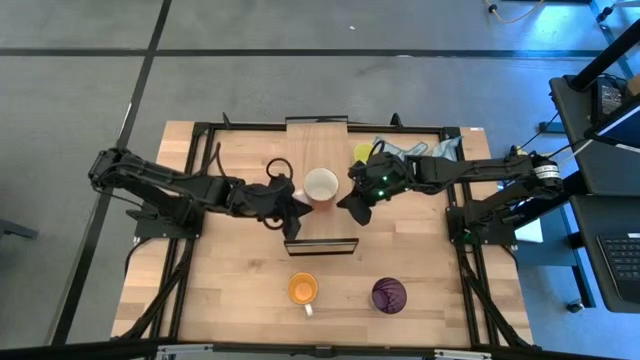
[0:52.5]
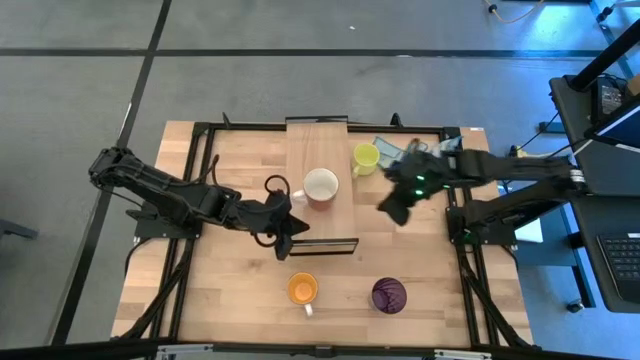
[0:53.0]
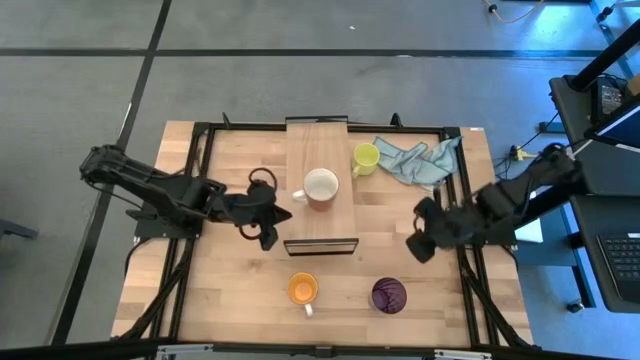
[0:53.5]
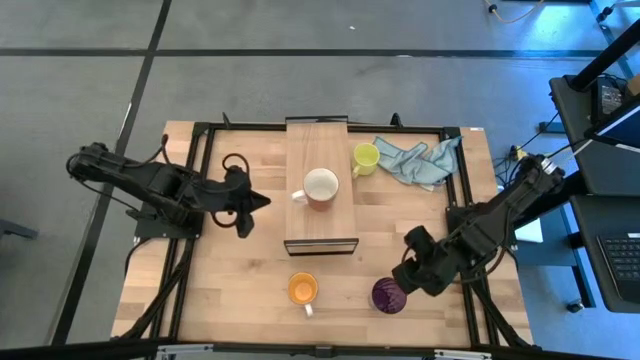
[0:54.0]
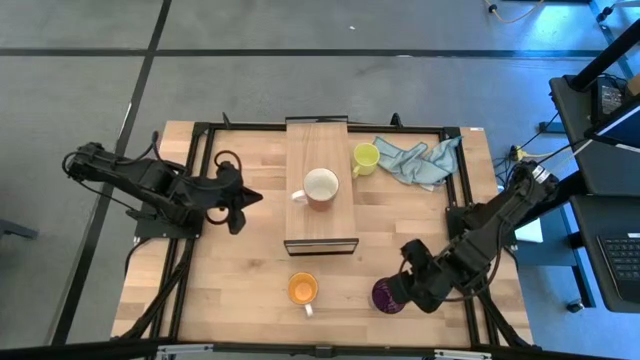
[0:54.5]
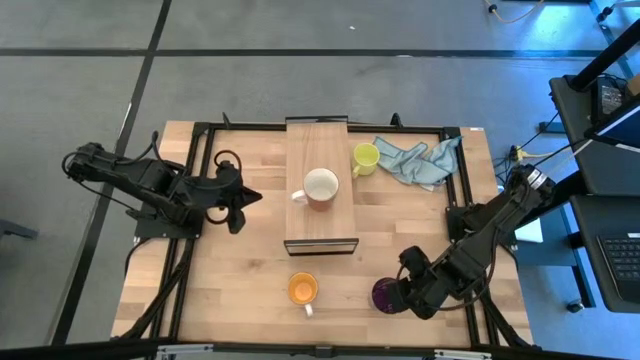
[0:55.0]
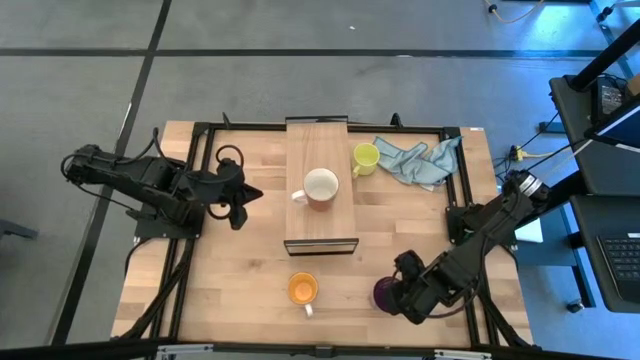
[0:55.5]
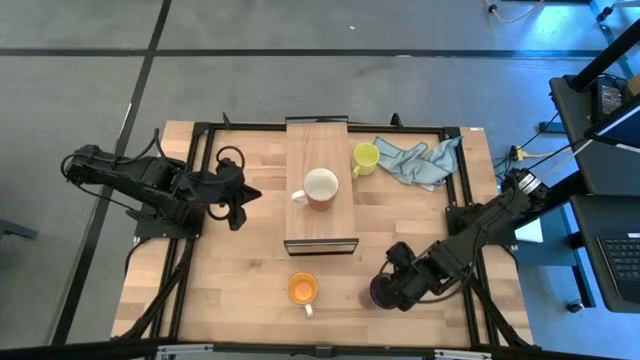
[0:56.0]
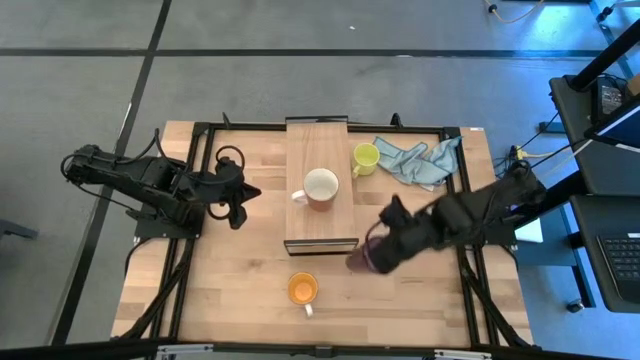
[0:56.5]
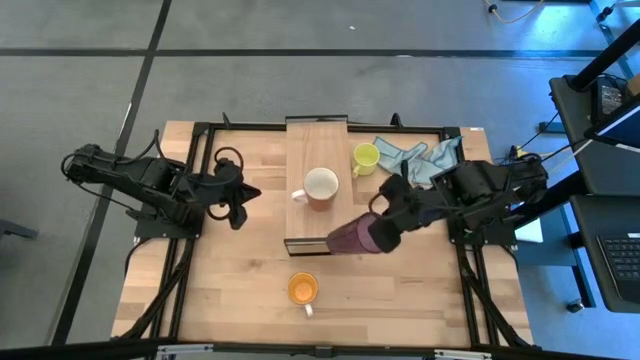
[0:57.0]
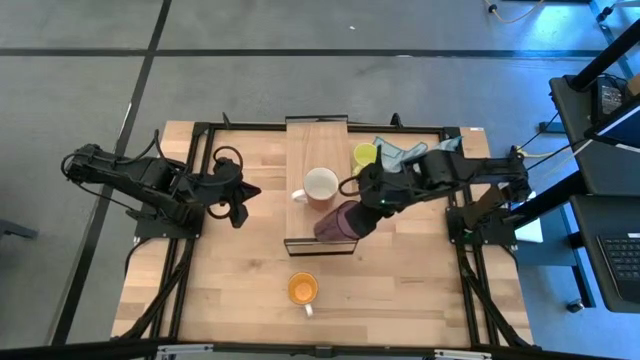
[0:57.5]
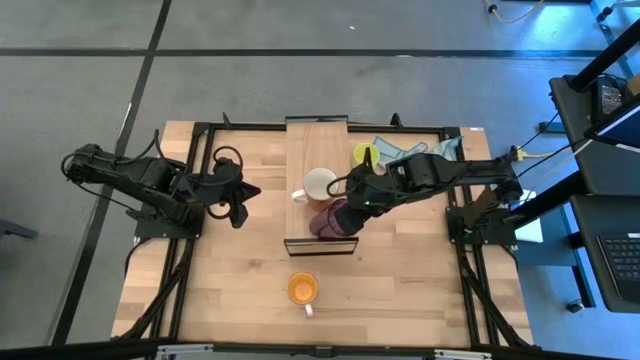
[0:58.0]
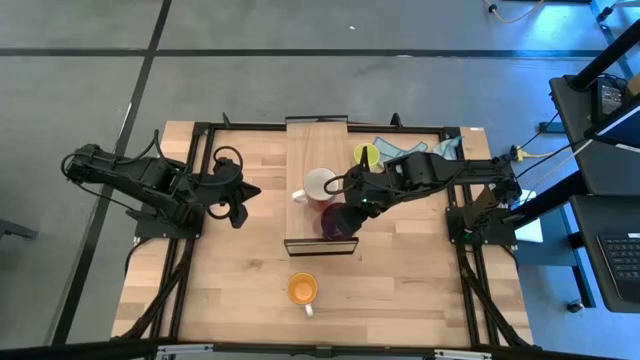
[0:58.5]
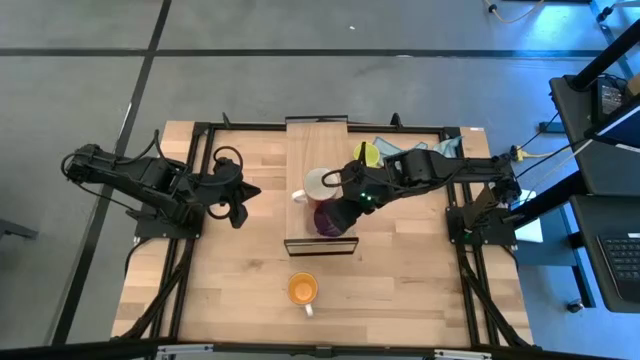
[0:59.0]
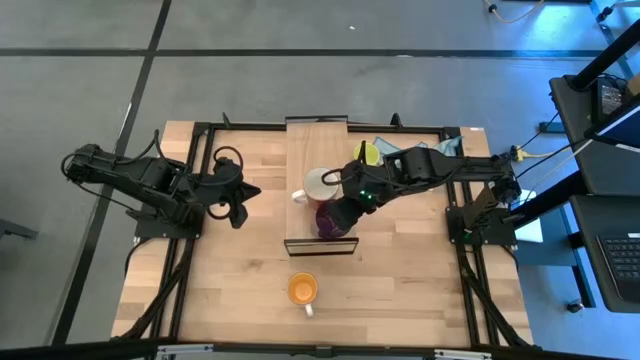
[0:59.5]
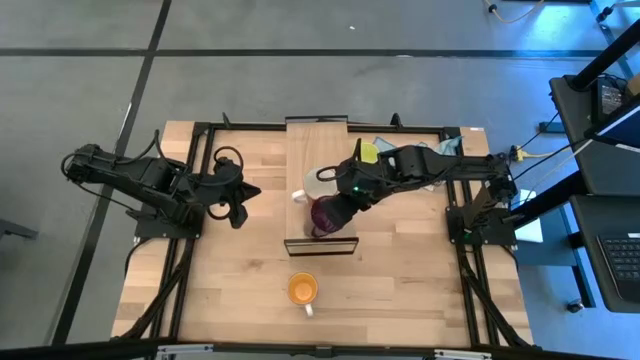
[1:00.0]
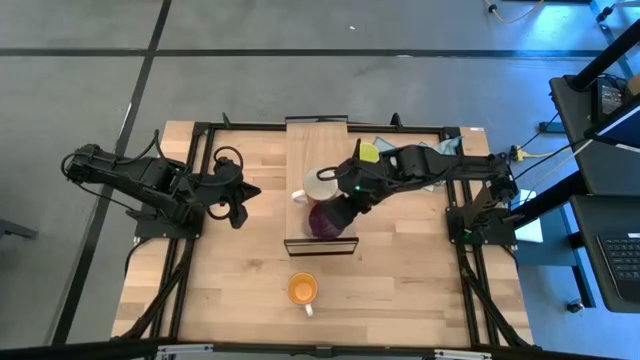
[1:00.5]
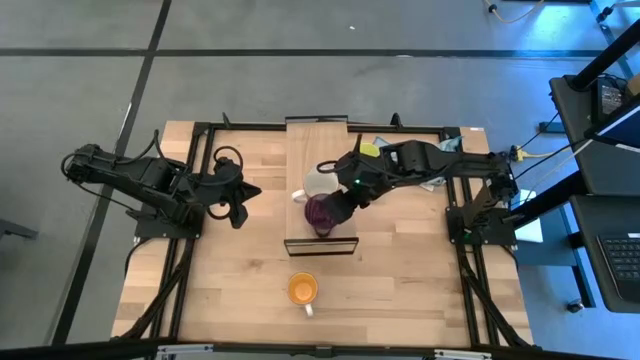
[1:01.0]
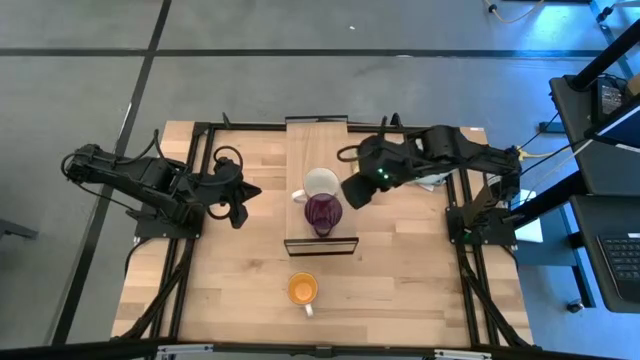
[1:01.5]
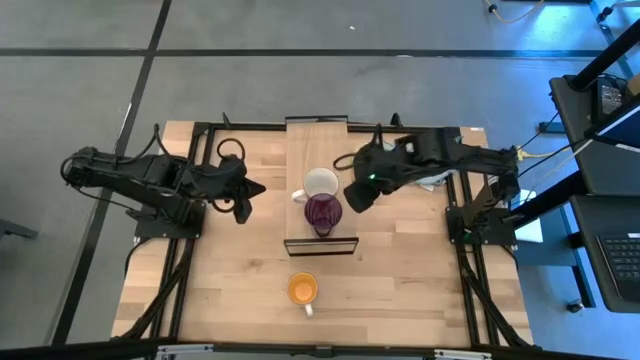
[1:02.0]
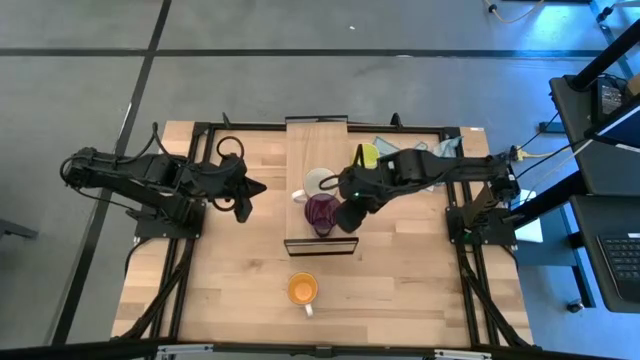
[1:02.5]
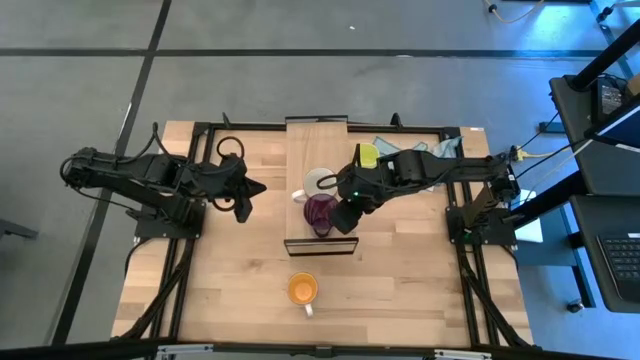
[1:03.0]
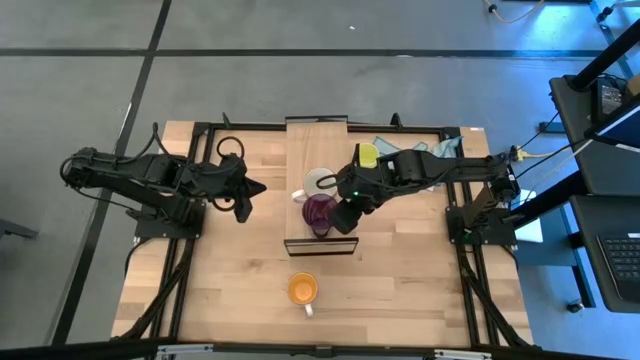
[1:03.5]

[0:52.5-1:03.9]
Task: Stack small to large cups/mugs on shelf
Put the purple cup on the shelf

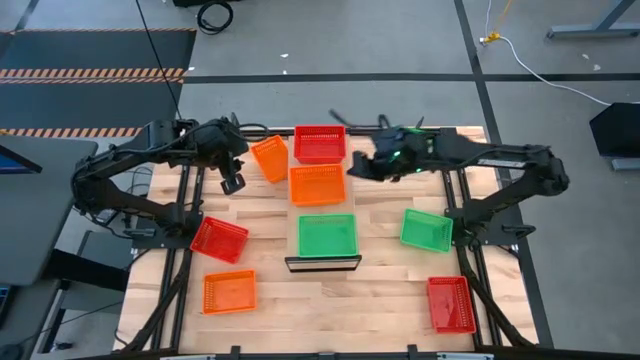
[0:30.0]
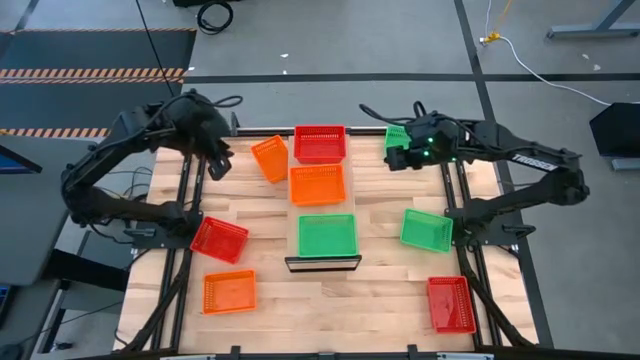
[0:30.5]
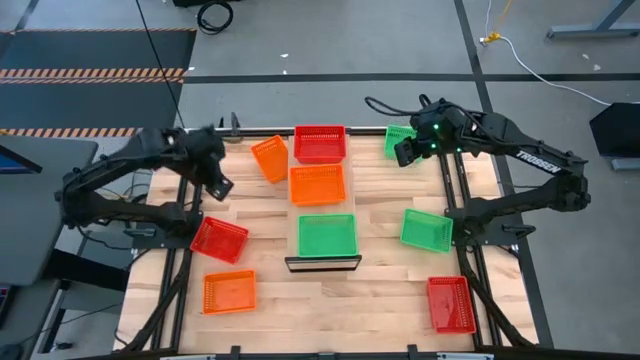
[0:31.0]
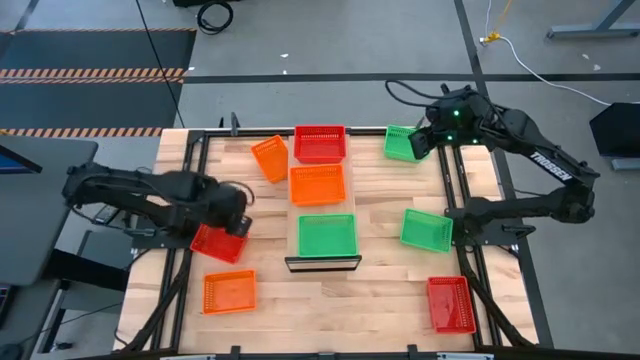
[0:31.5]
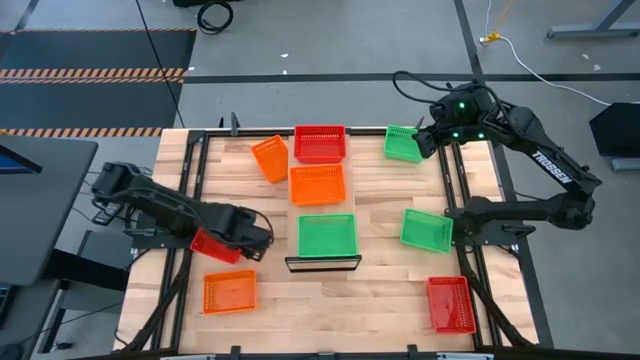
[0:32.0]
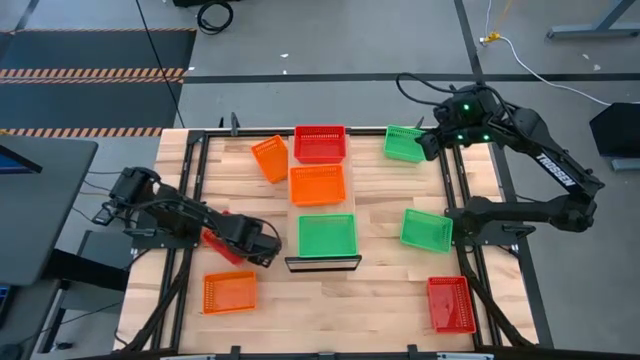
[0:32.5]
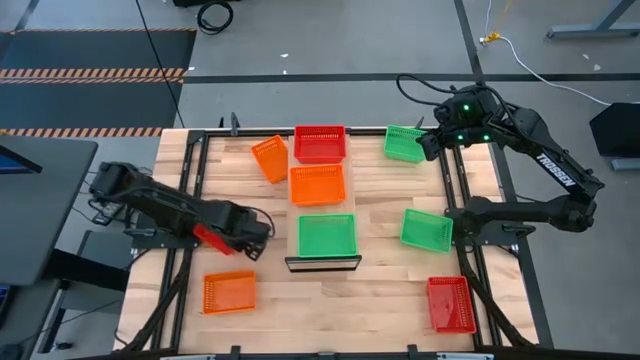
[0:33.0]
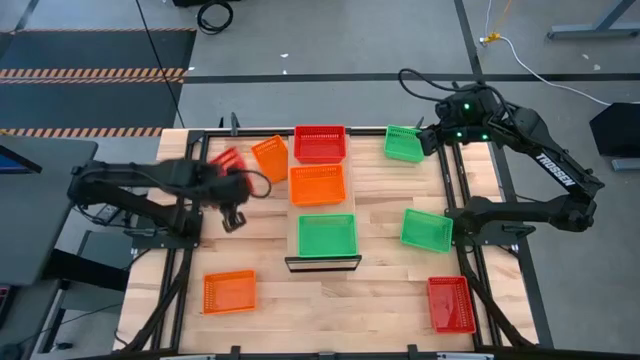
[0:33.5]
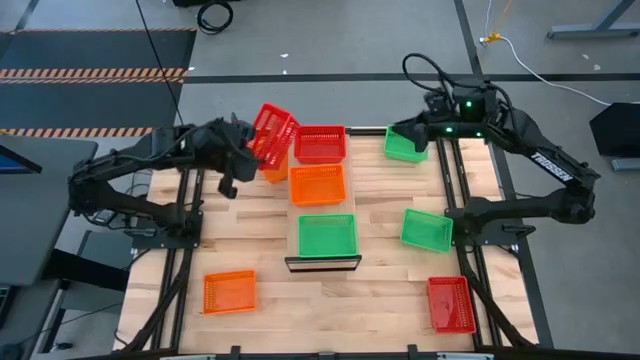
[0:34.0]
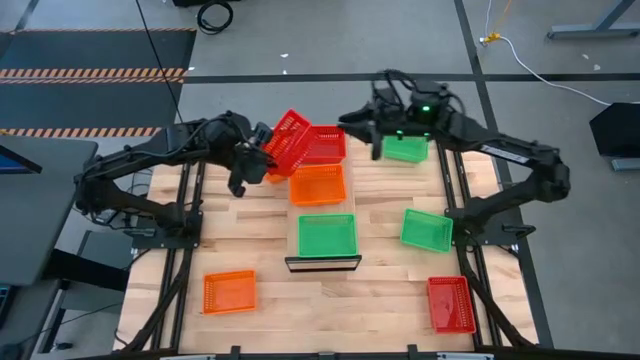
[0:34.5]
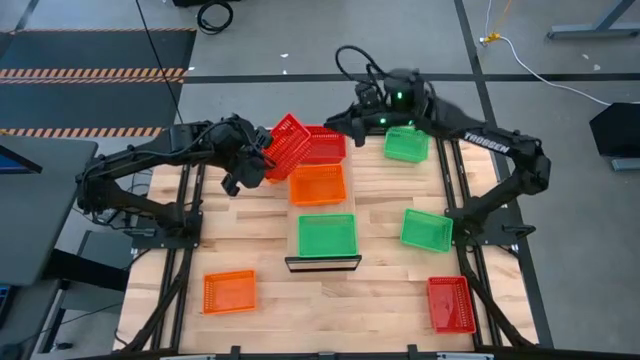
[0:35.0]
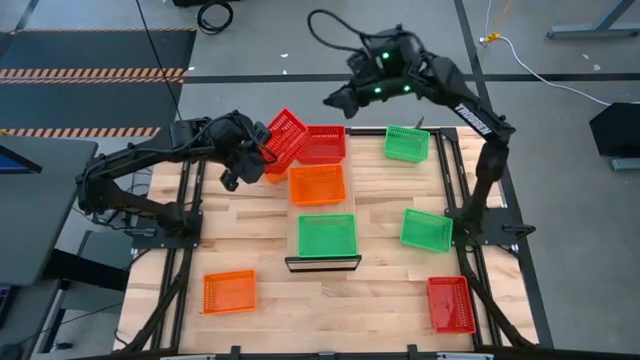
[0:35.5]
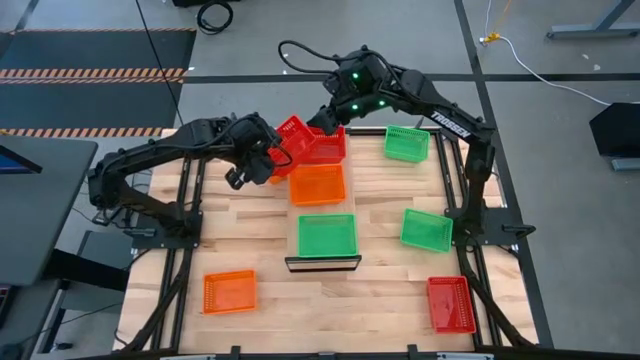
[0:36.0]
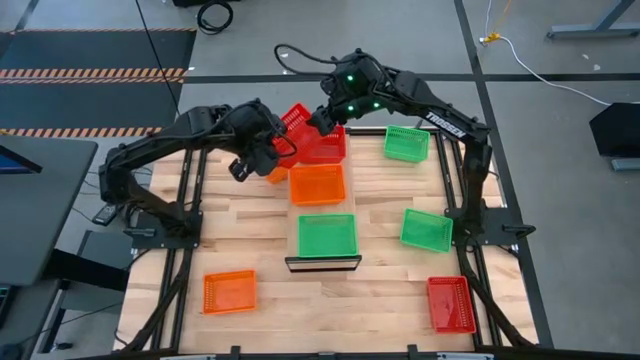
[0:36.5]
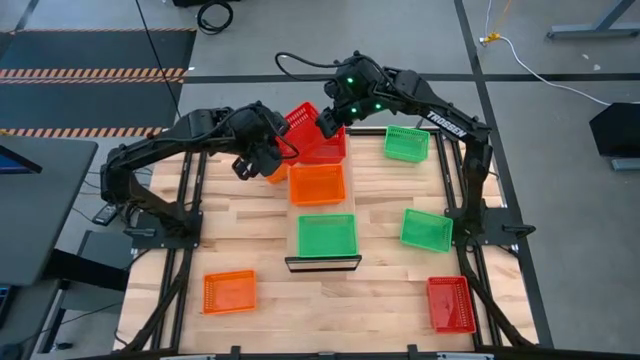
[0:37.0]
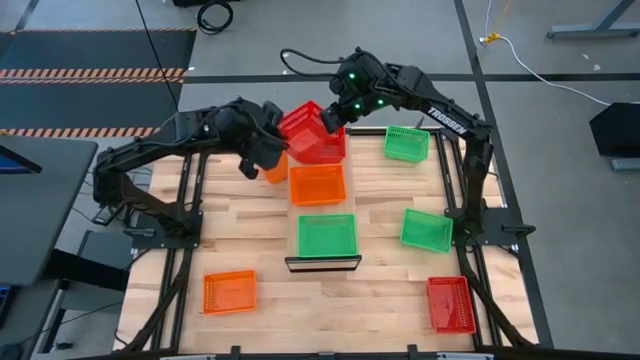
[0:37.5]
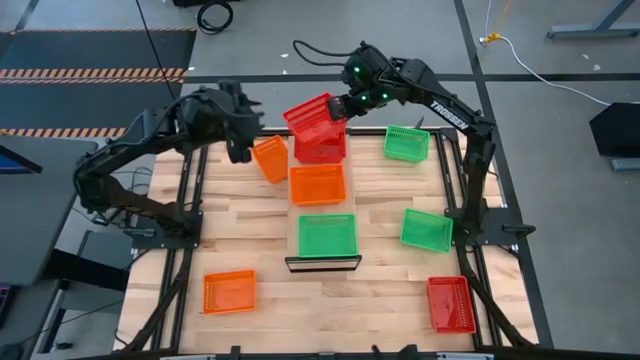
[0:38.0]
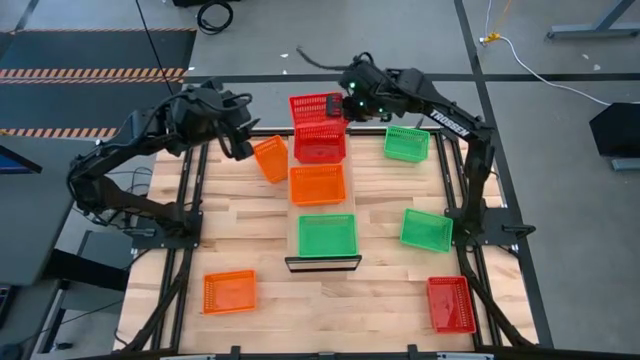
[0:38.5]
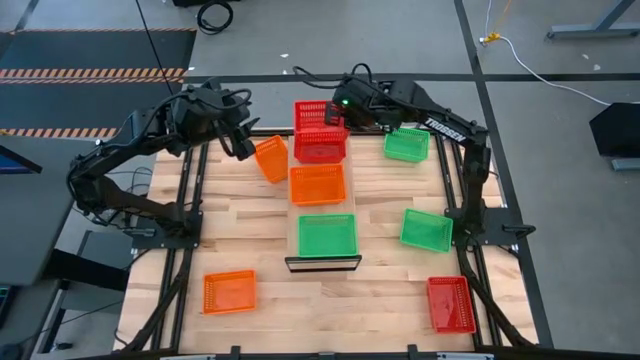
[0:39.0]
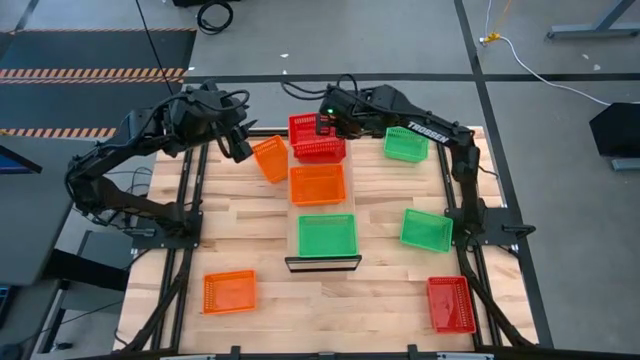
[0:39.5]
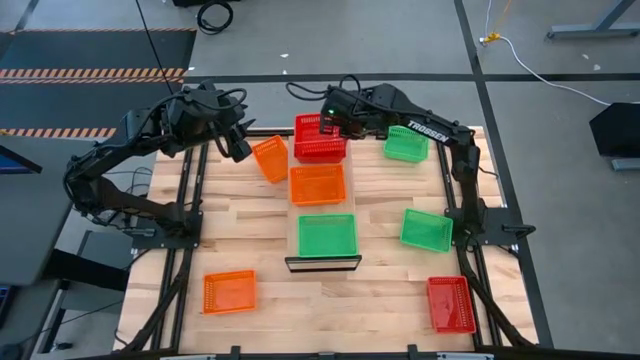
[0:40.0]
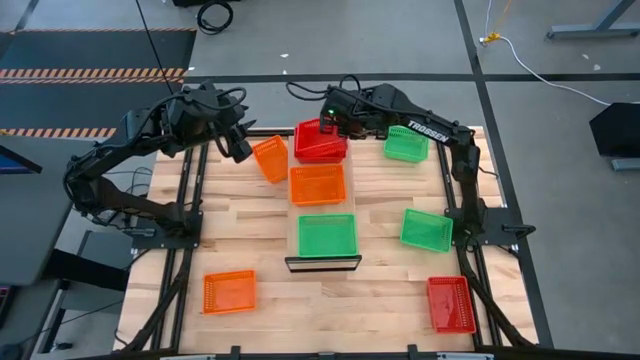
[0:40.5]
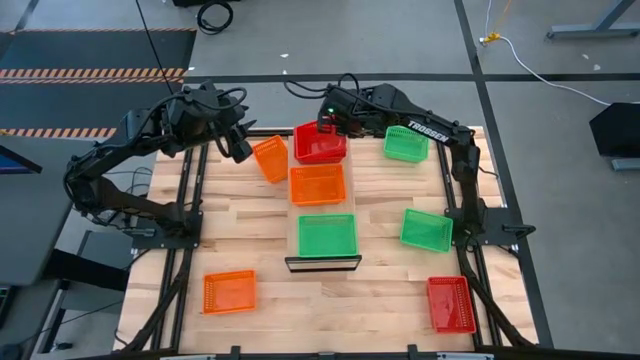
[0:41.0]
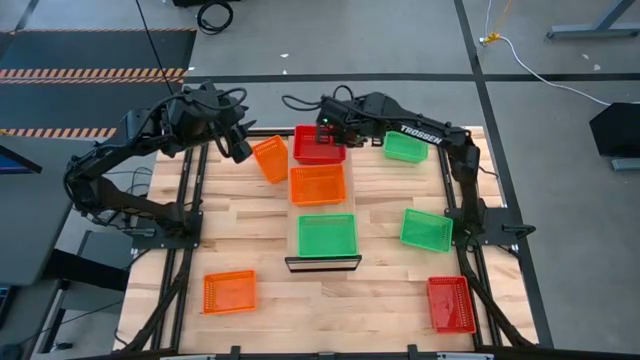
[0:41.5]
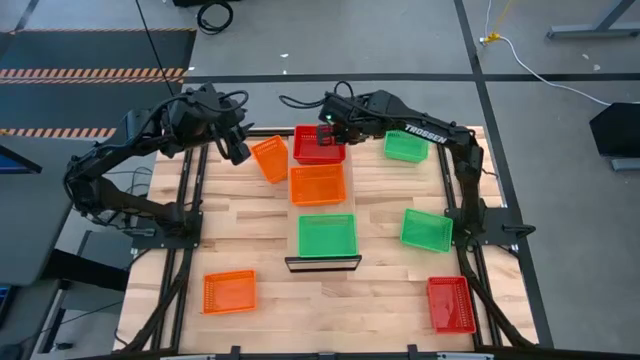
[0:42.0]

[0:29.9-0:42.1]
Task: Stack baskets on shelf by color
Stack the left red basket on top of the red basket on the shelf
